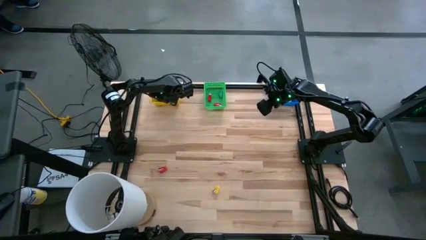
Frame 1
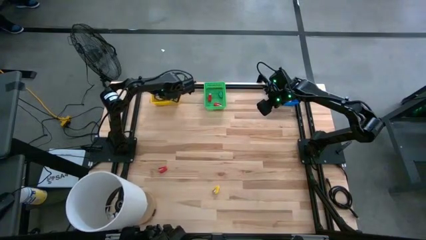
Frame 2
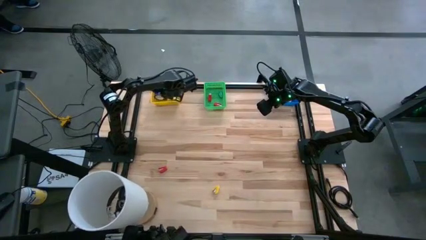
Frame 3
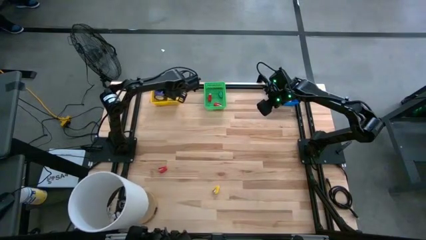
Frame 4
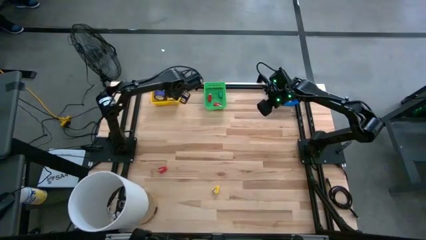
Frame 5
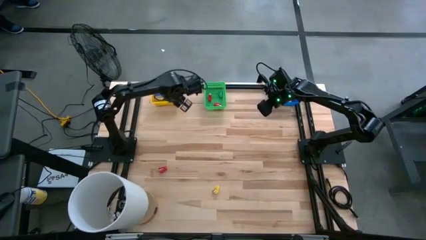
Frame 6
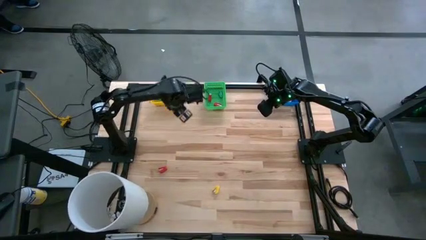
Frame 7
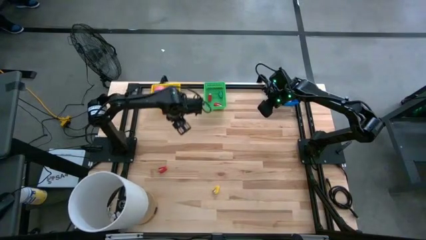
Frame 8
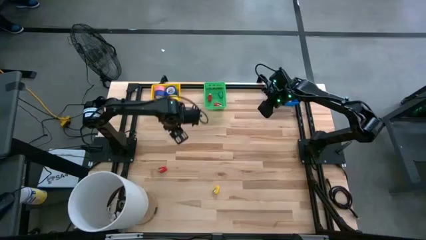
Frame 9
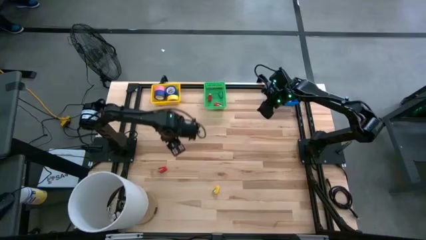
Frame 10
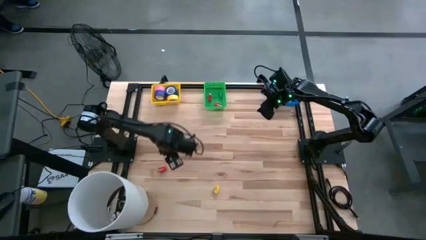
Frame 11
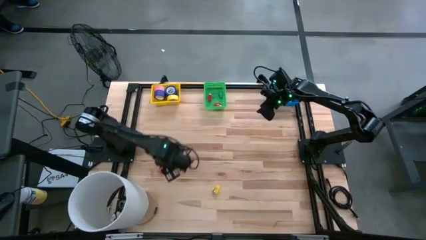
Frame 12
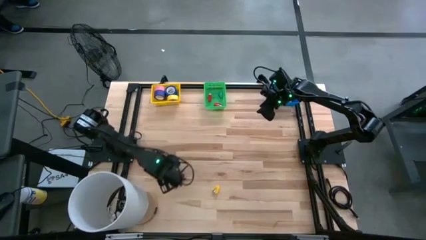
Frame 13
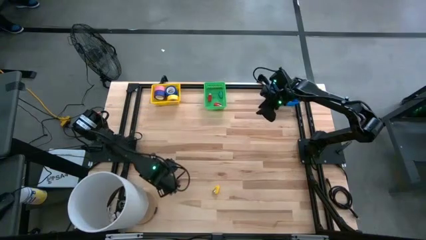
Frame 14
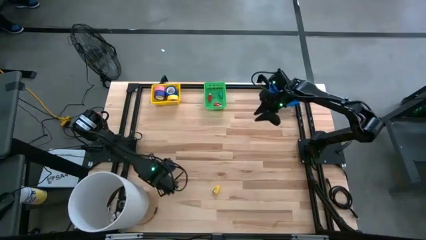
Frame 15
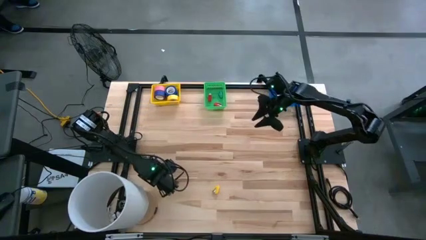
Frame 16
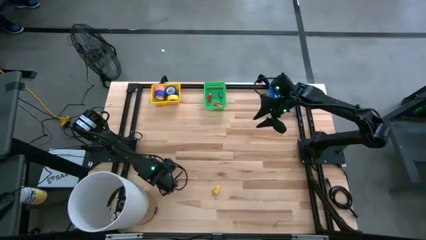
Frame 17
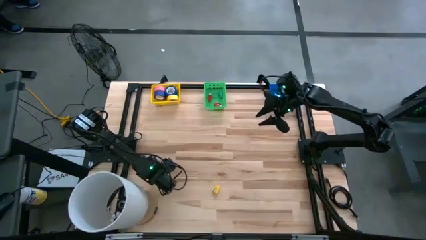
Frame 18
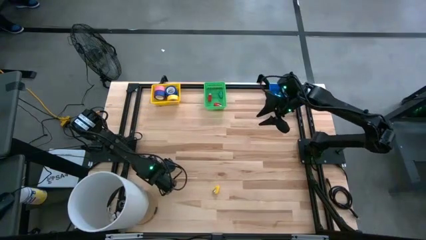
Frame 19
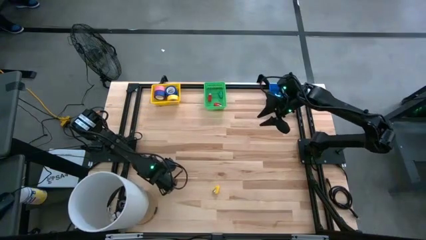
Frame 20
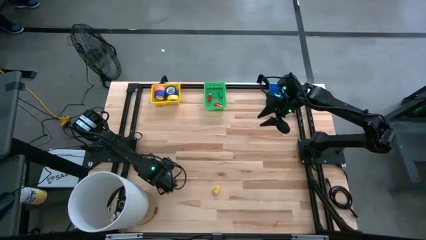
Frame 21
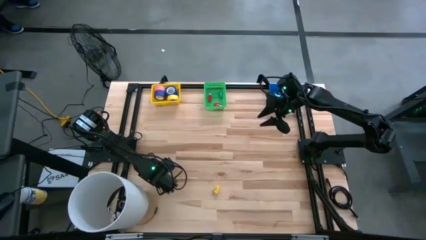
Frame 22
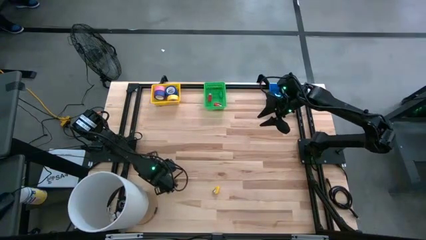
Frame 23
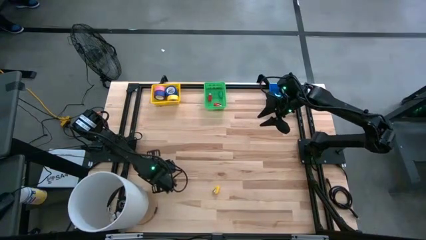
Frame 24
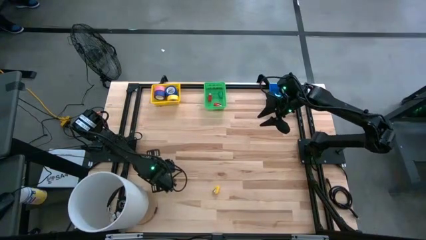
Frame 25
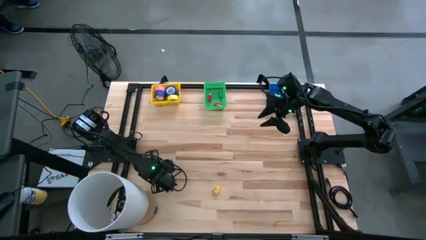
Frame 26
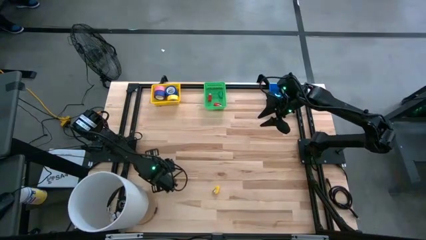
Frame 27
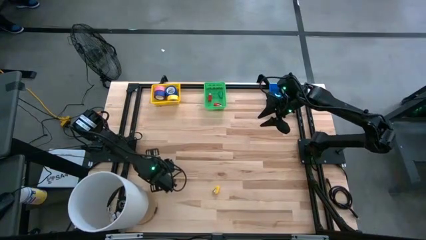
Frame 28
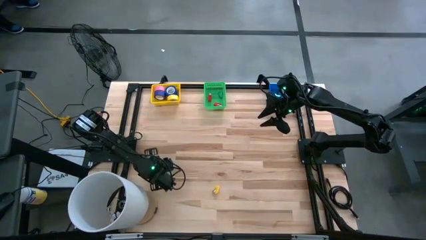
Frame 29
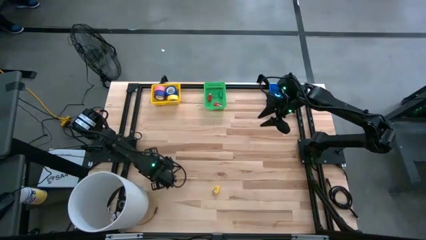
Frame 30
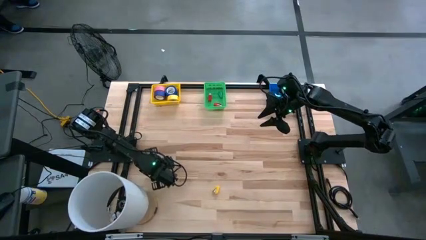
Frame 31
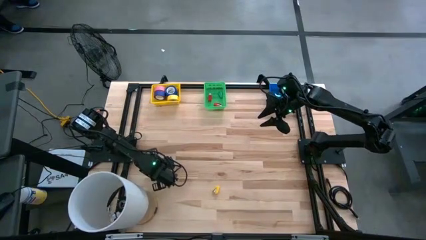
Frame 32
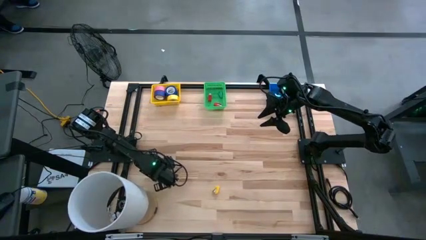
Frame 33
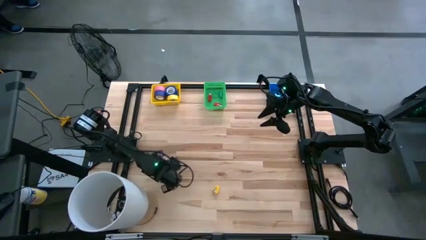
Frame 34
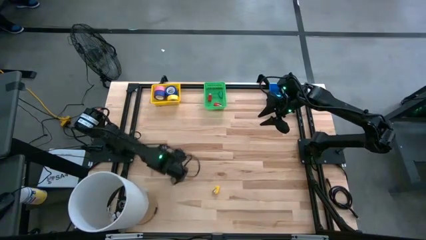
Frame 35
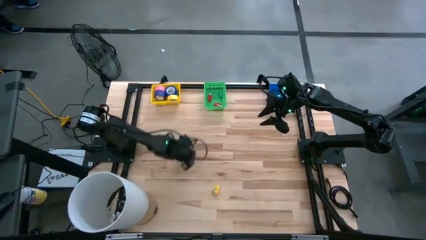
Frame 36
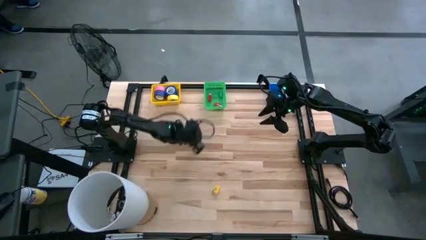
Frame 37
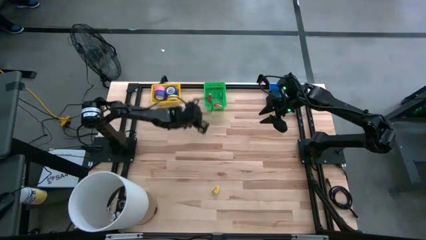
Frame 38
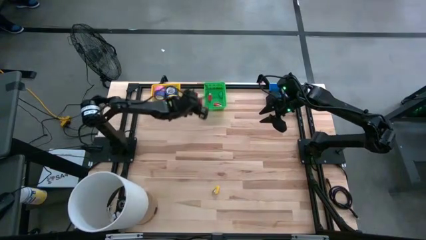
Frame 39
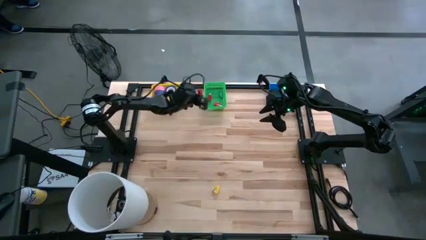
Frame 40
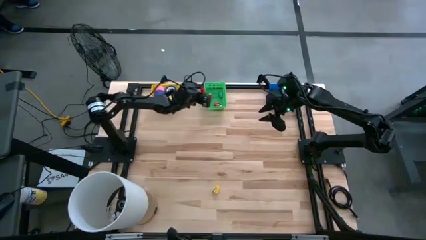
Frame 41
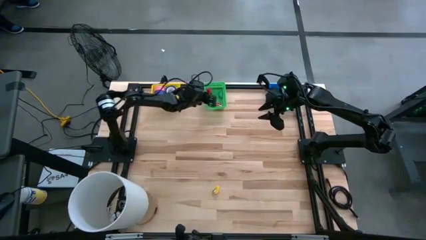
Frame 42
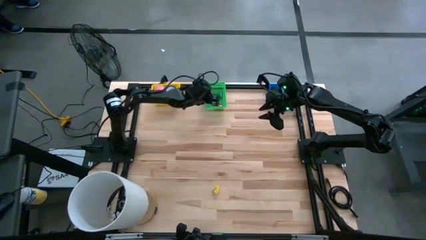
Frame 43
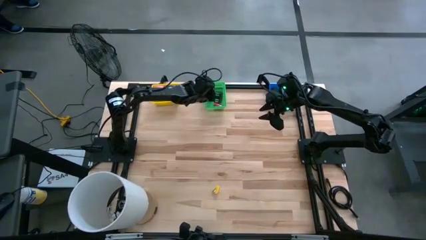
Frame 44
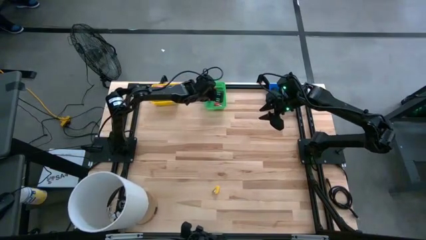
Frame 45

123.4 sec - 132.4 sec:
Task: Pick and place Stapler, Stapler remover, tape
Put the red stapler into the green basket

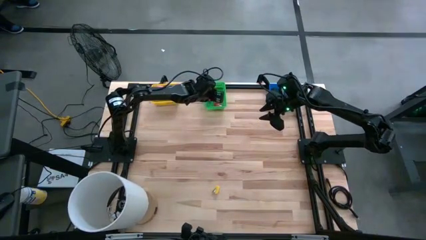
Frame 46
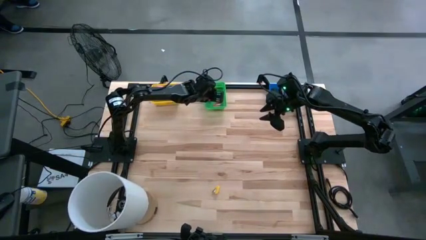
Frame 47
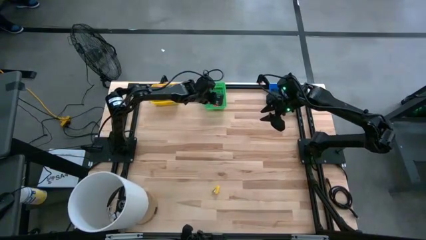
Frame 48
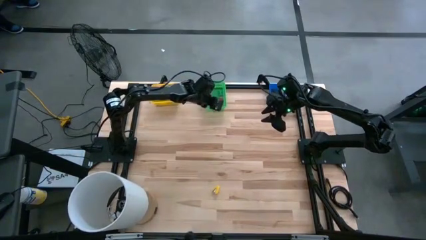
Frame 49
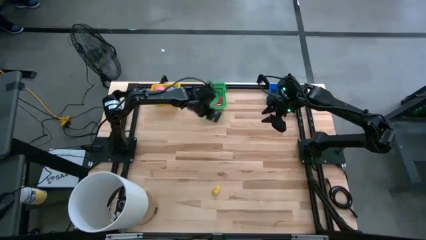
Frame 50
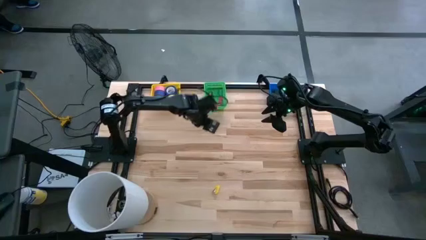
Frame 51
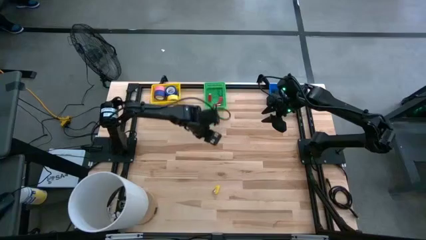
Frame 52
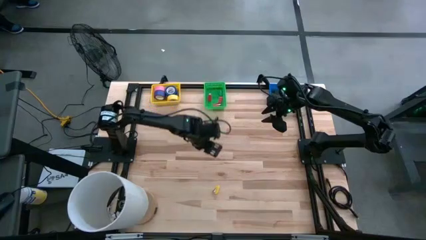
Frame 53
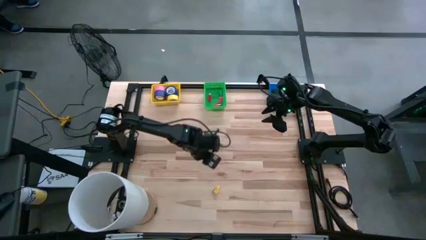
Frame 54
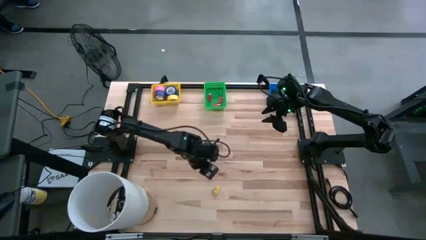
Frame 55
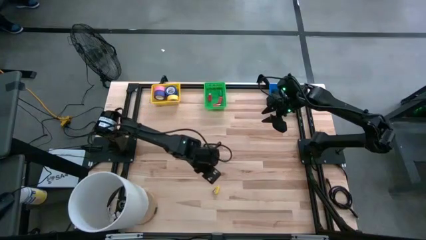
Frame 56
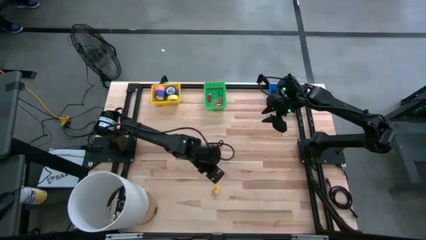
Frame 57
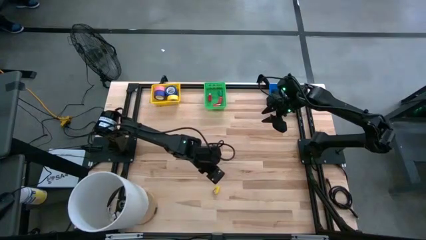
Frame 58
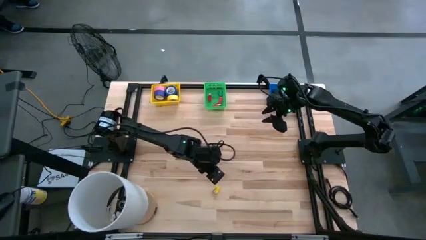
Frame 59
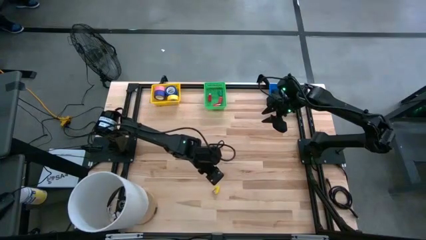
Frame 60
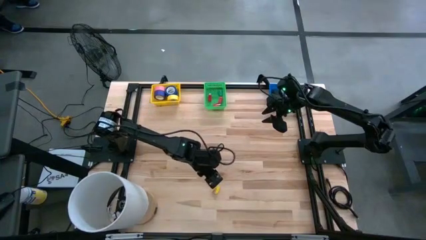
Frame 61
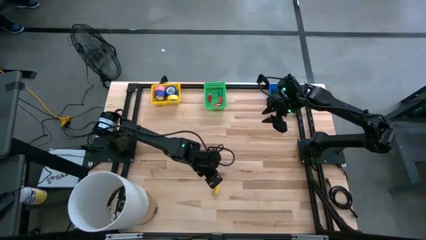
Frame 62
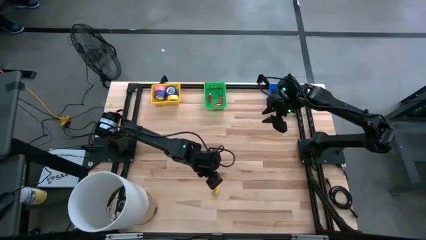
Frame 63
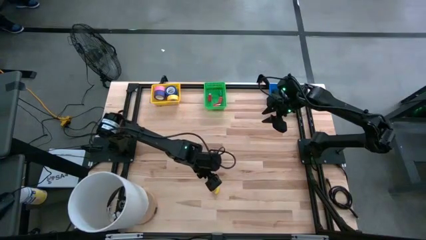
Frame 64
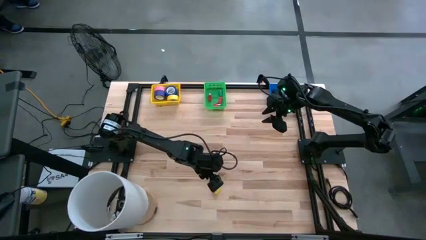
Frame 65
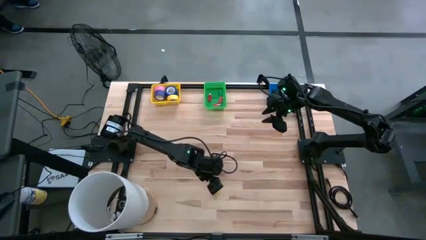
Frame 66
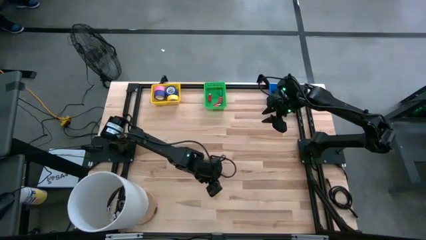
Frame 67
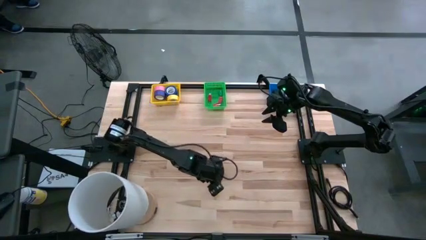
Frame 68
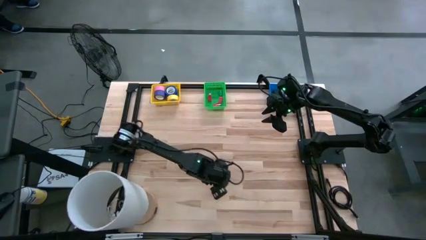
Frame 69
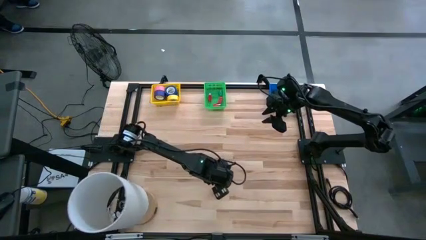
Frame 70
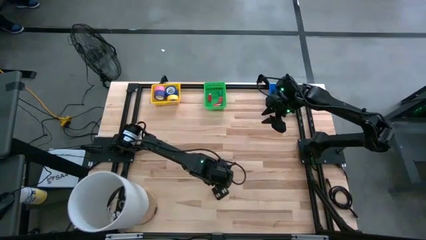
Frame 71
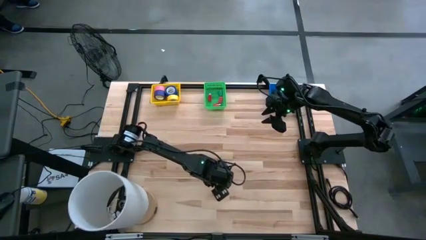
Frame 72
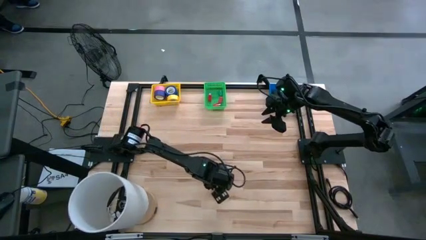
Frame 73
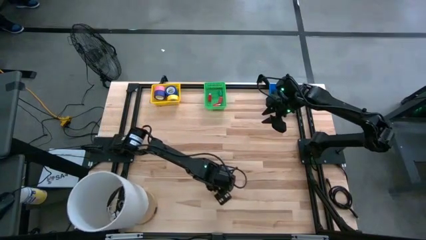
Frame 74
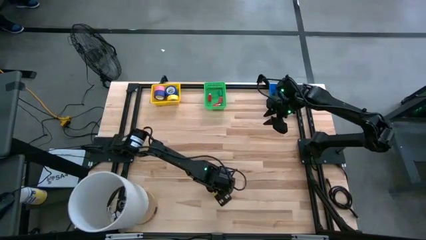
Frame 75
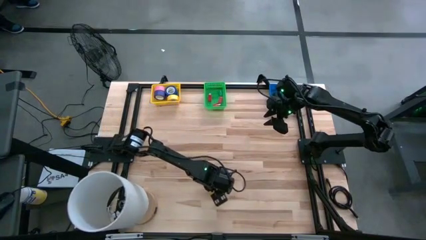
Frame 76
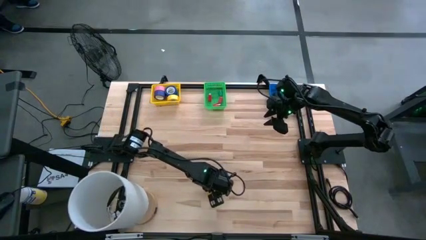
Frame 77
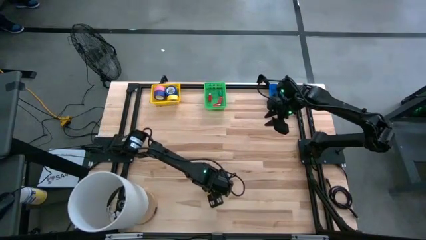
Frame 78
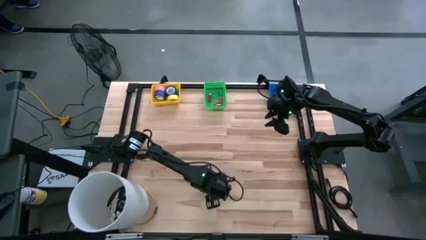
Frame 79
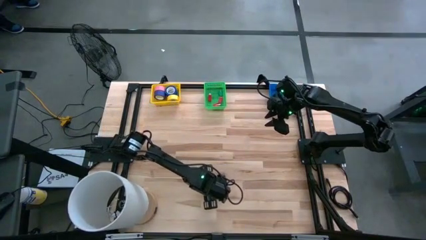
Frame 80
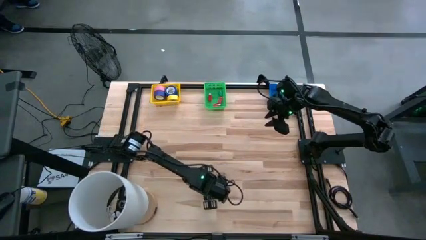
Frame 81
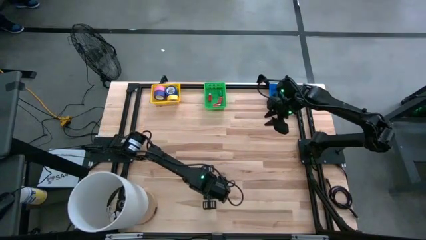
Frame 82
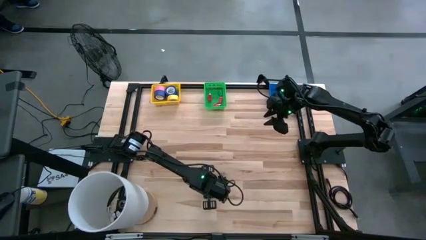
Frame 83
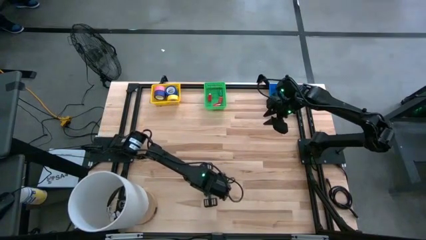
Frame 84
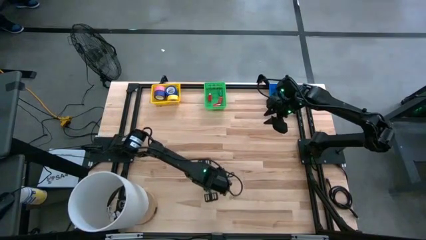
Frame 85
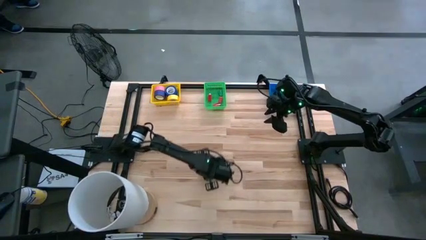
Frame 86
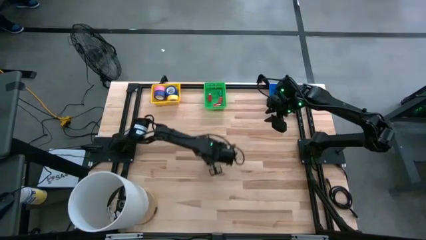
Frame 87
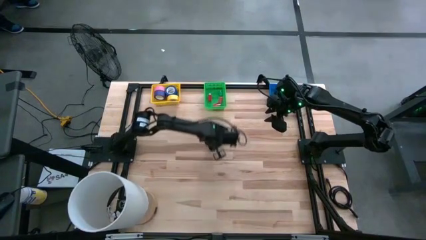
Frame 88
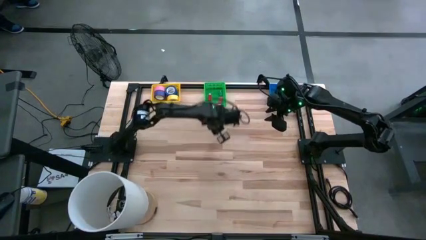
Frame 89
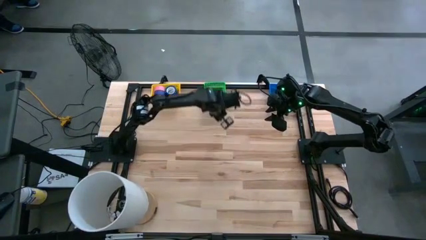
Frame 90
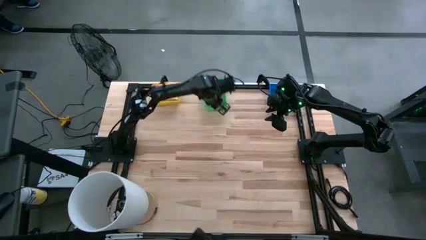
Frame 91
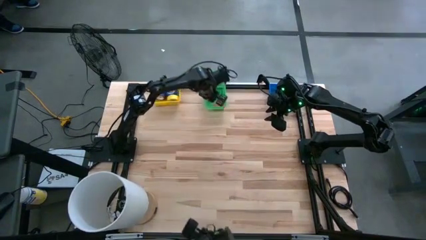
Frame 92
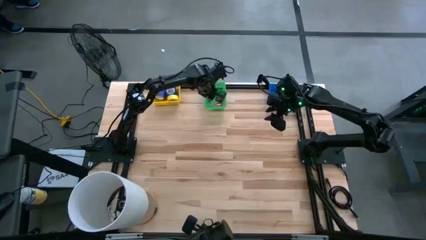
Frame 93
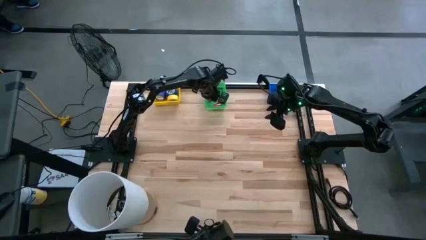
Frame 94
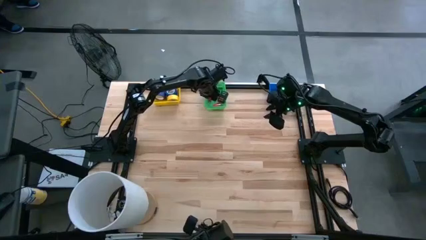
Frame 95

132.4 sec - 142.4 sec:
Put the yellow stapler into the green basket
